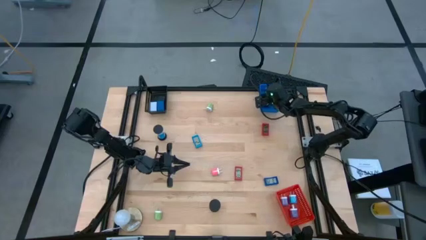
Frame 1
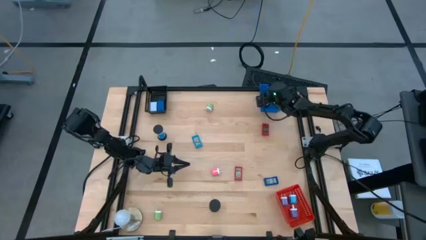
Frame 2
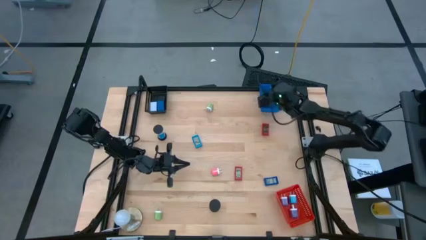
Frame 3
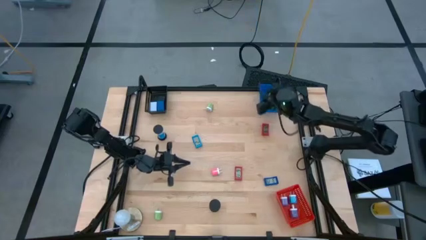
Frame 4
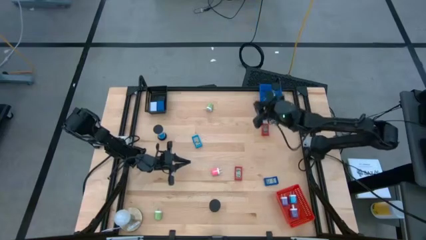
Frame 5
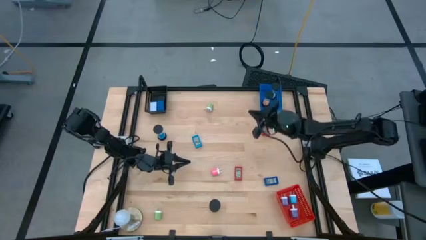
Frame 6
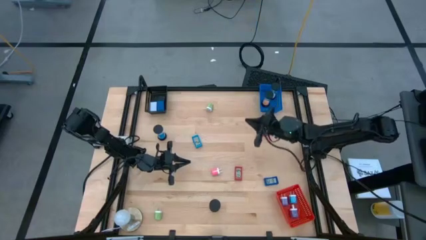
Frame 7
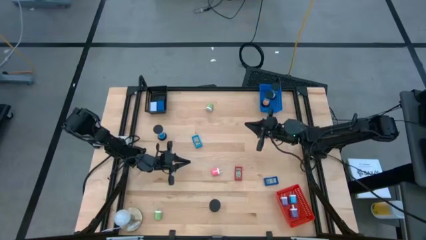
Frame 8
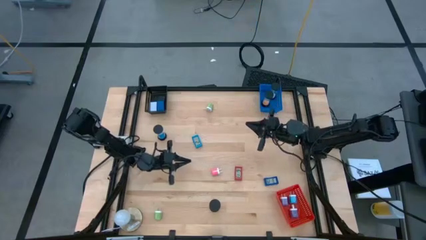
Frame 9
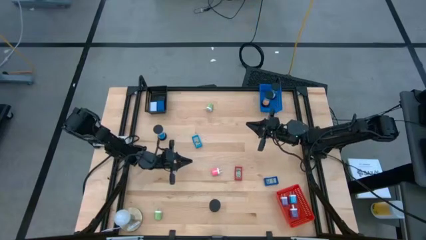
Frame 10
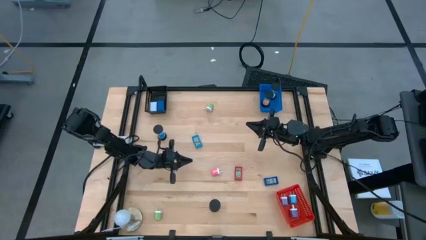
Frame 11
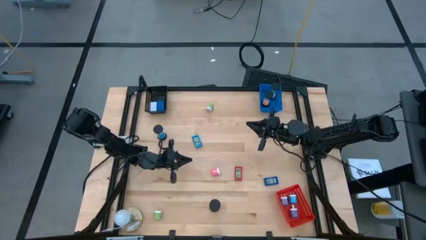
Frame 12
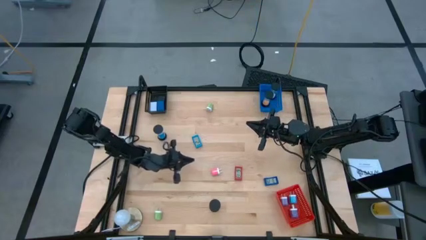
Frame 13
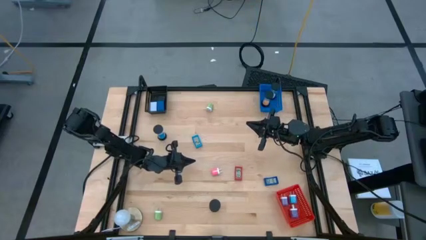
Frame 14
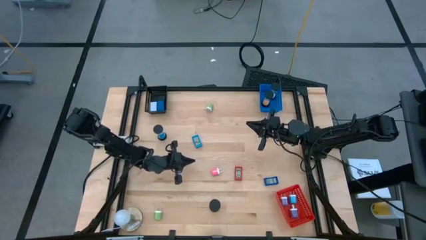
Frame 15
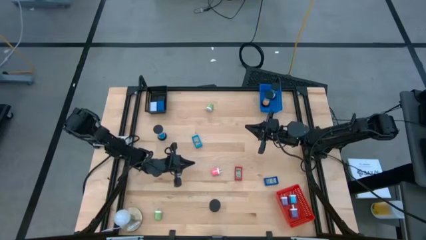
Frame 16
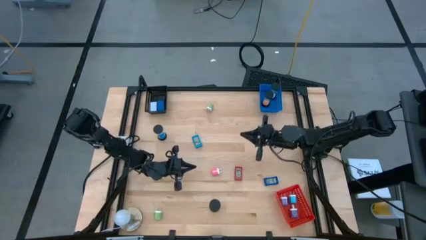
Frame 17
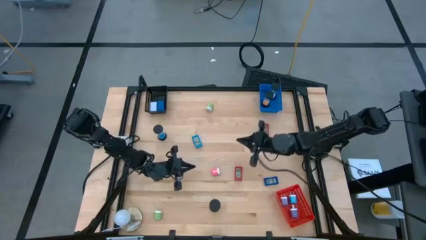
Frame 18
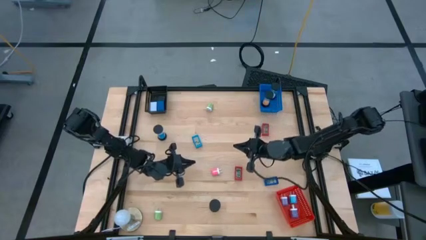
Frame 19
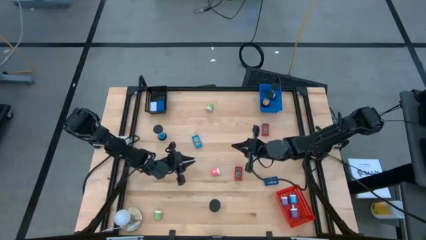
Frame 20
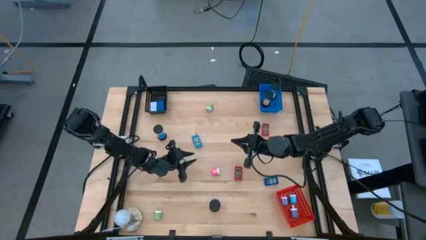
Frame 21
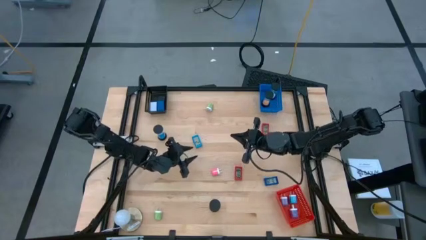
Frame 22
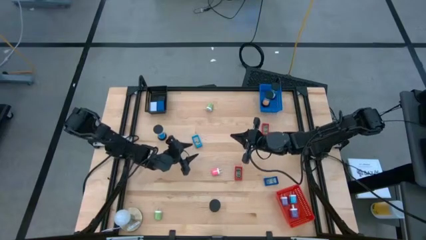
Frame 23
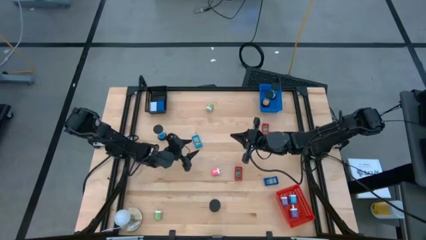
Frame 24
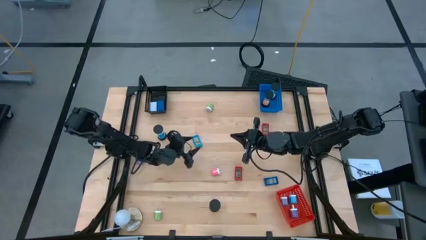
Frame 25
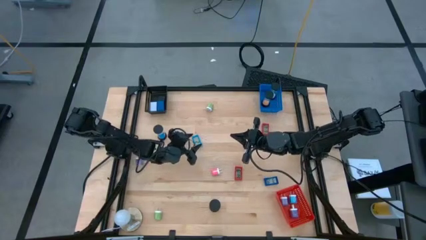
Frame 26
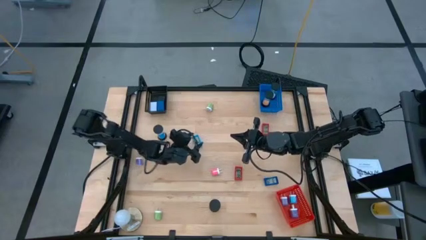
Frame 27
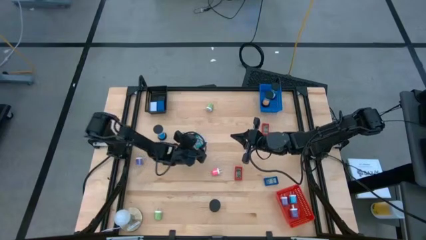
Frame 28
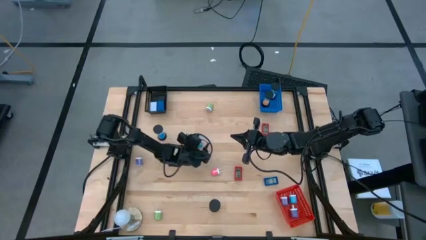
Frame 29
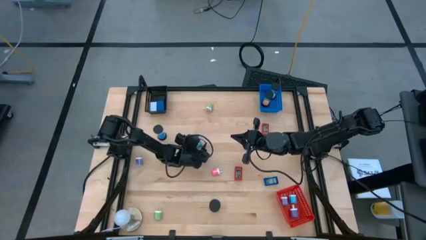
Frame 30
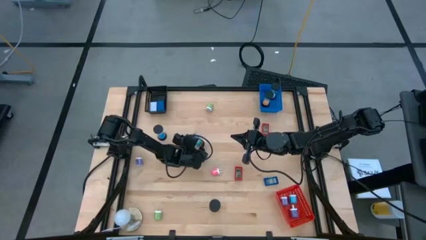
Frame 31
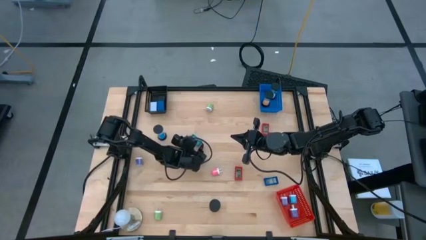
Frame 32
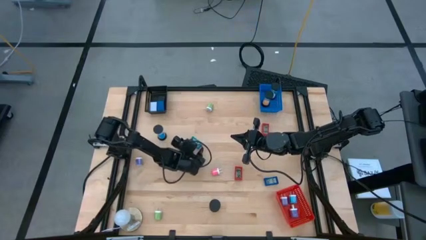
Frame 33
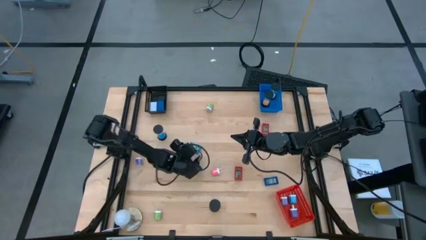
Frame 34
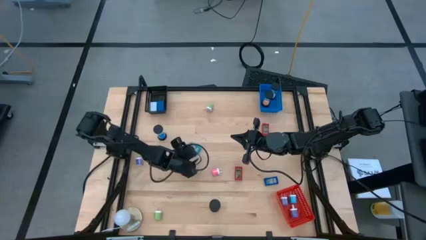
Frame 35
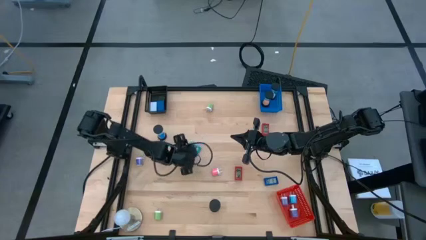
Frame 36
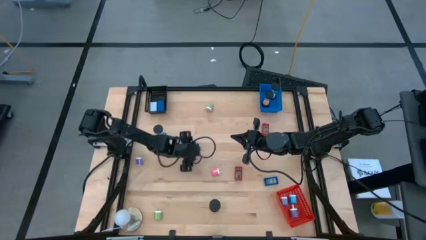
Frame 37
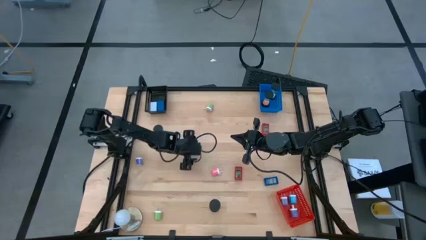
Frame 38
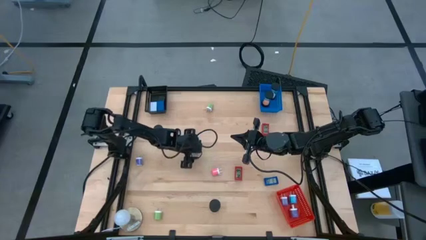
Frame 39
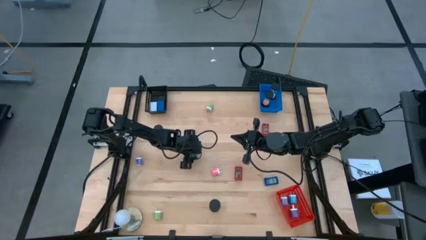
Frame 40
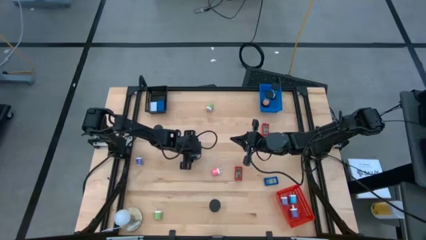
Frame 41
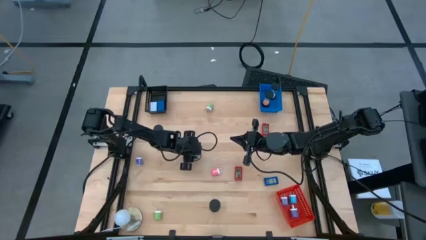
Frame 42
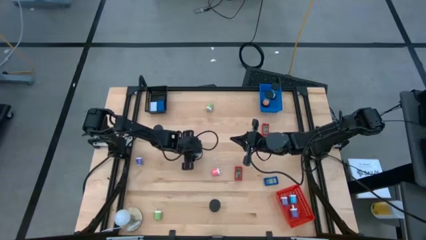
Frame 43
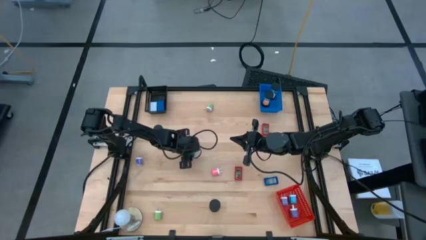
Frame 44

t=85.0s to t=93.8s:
Task: Pick & Place Office items
Put the light blue digital timer into the black basket

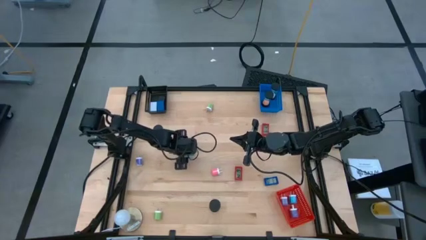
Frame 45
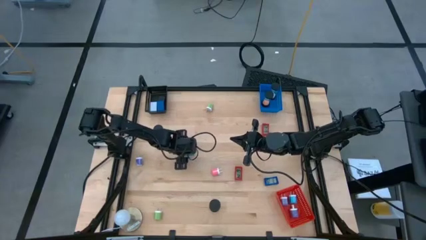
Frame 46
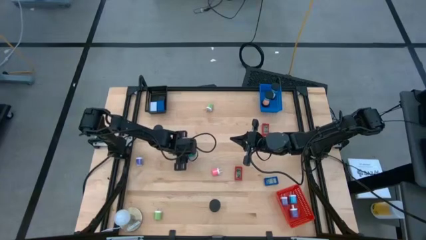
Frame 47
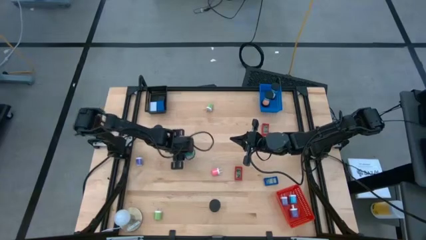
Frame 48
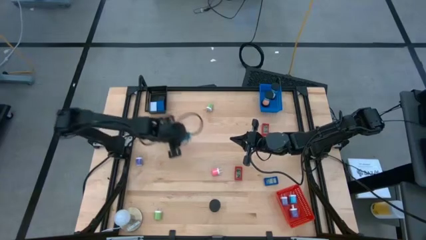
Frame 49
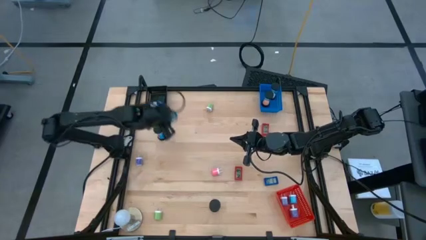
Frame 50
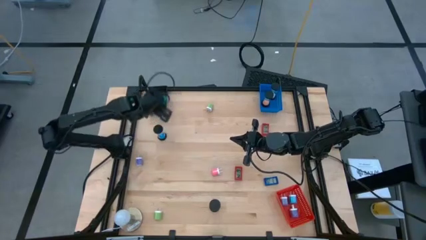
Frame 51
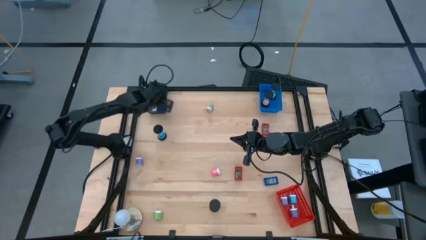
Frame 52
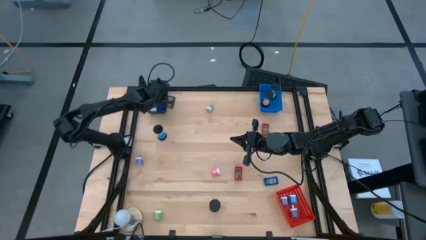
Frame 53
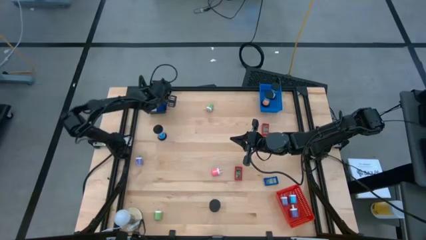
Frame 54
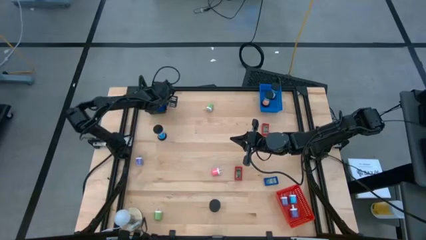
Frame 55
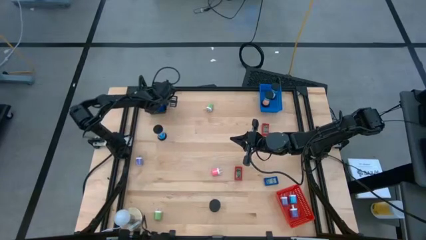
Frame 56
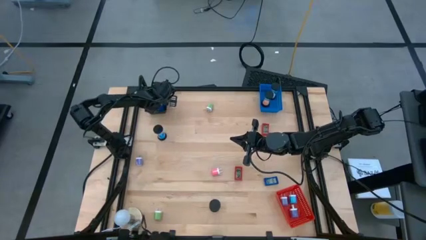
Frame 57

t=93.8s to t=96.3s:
Put the light blue digital timer into the black basket

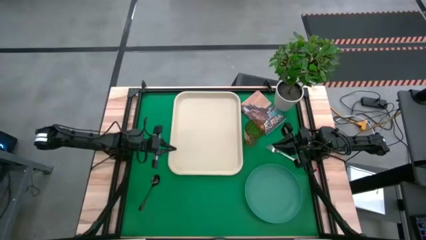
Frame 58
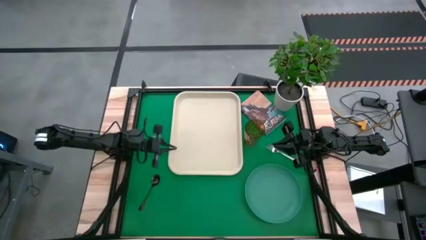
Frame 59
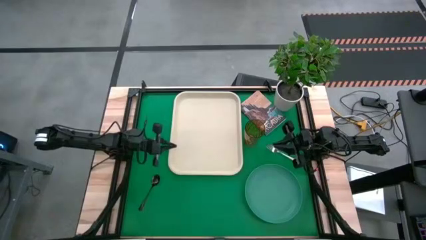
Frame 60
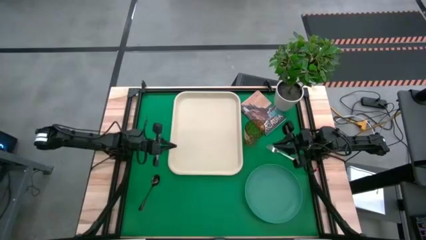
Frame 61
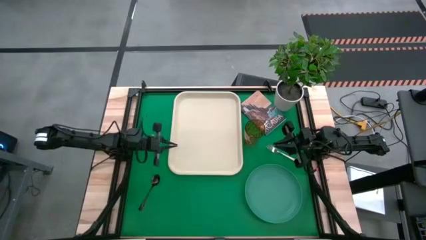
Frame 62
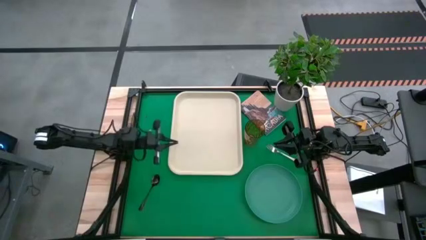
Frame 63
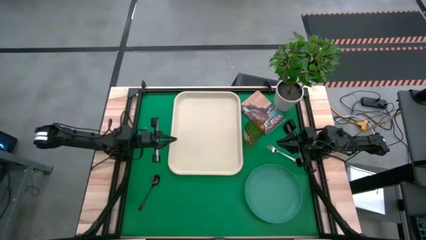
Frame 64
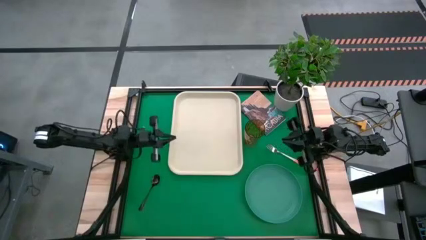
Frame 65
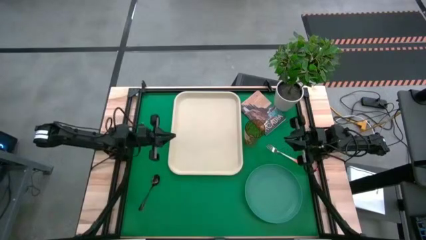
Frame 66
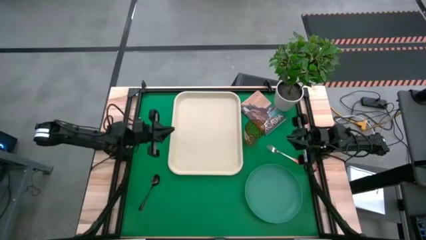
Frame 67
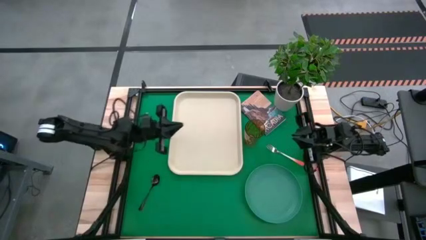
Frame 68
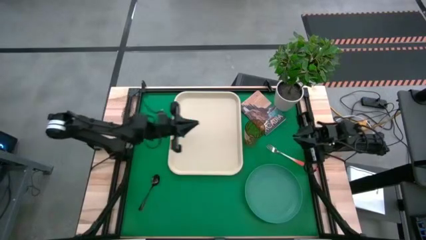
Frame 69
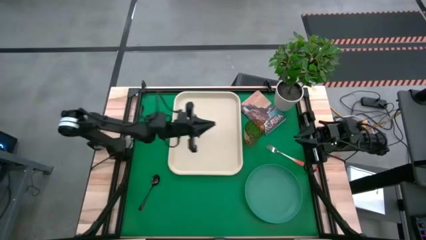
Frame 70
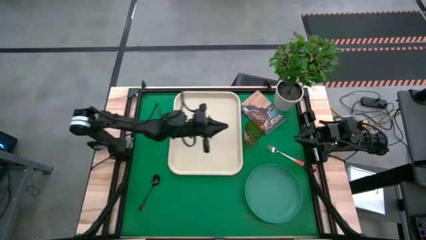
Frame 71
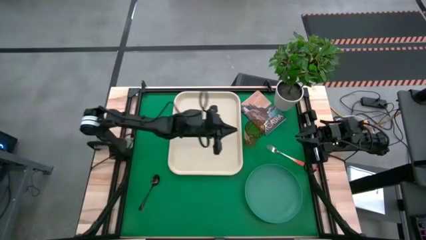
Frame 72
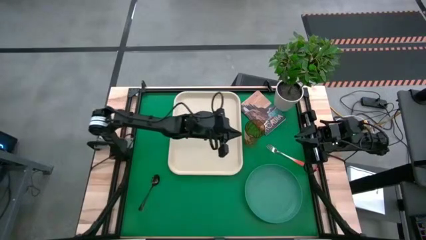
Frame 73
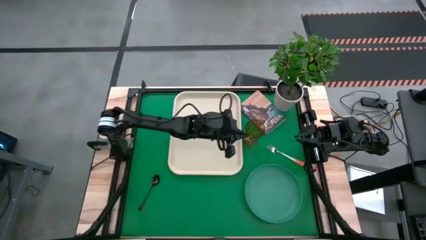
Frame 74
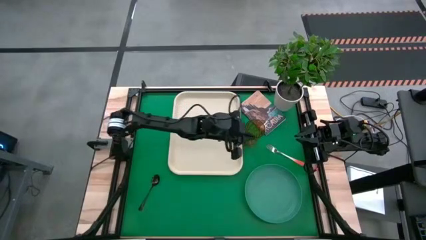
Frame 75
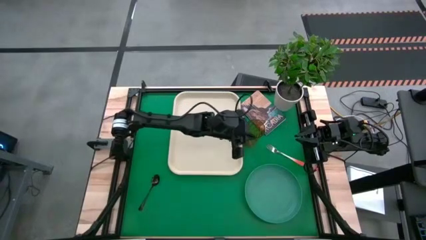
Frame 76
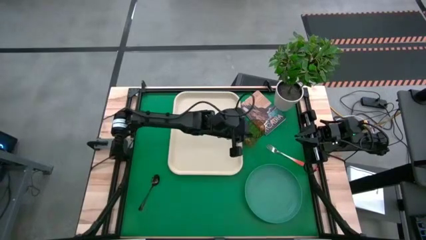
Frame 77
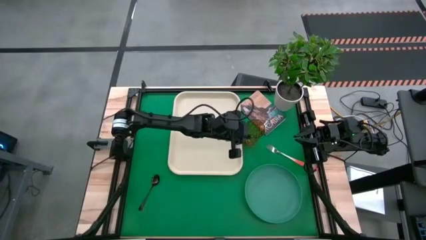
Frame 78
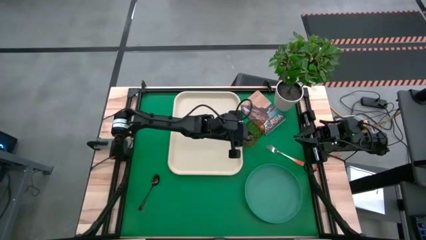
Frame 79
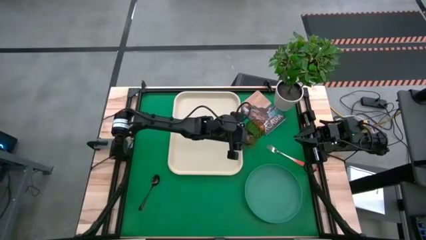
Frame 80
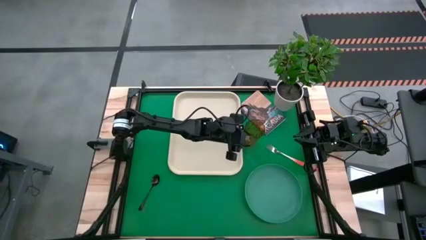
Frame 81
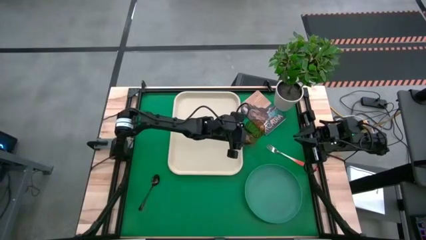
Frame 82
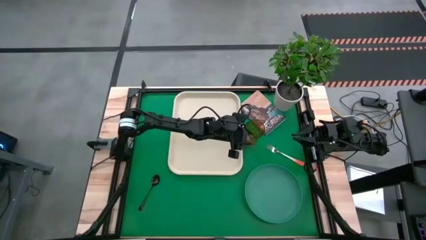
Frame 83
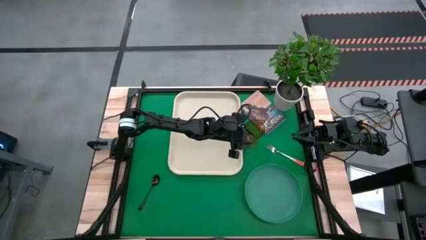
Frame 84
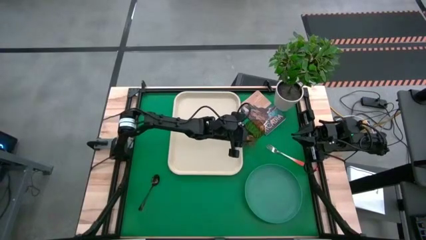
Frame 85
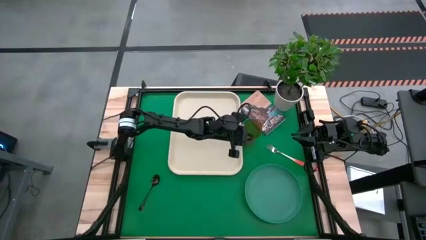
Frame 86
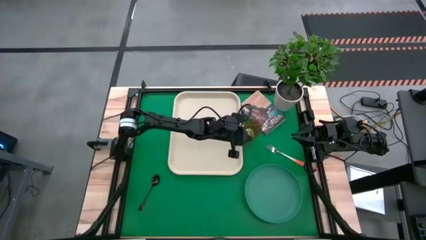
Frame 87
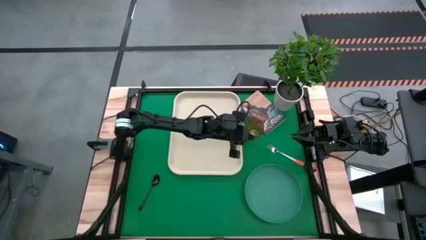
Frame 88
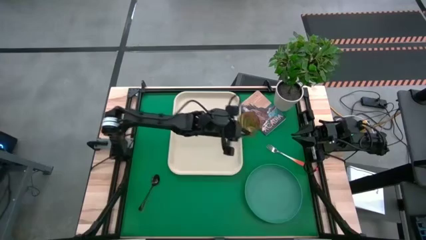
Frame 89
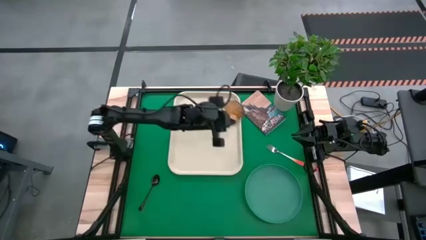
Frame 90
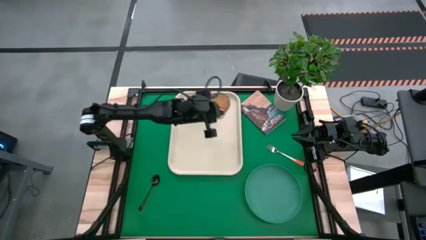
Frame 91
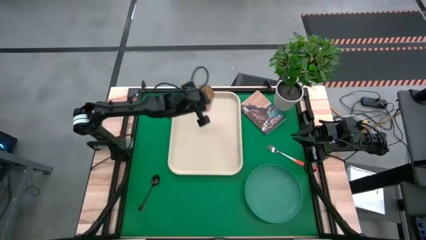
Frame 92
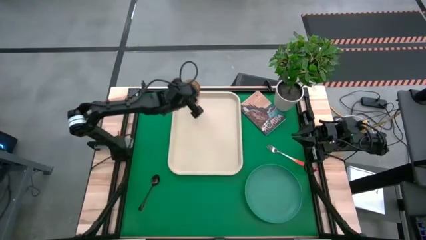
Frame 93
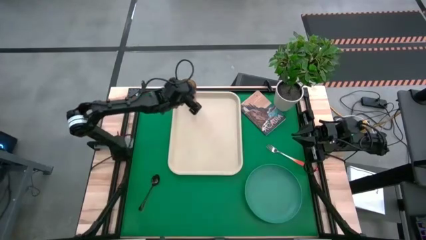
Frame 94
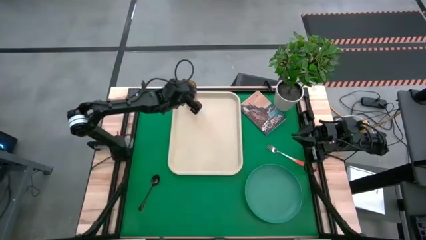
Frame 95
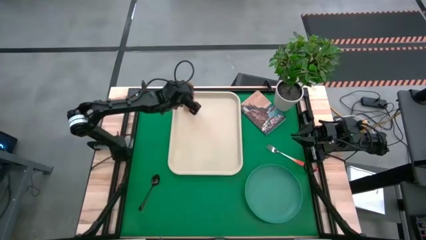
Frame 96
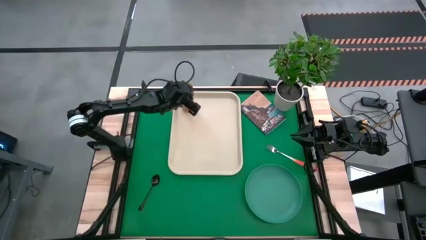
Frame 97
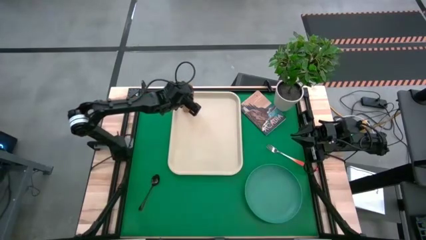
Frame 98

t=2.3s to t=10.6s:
Task: Pick and place plate/cup/fork/spoon on tray
Put the orange cup on the top left of the white tray
